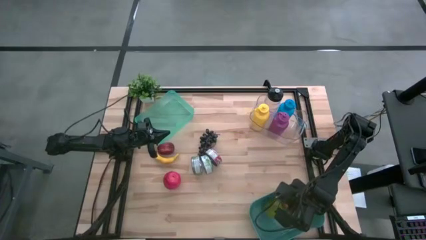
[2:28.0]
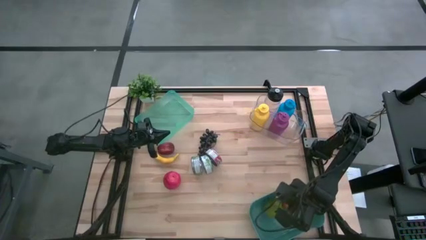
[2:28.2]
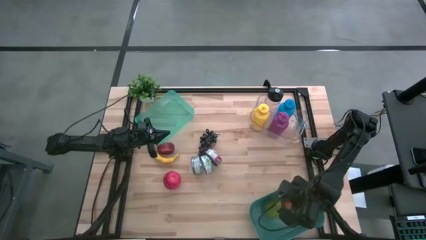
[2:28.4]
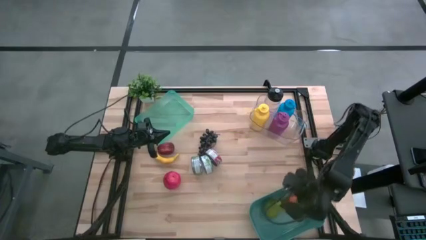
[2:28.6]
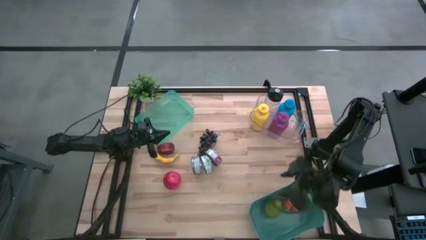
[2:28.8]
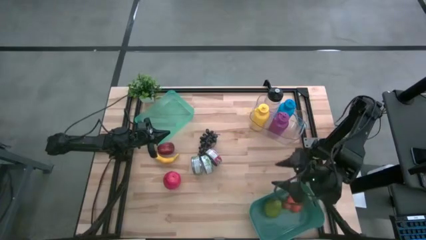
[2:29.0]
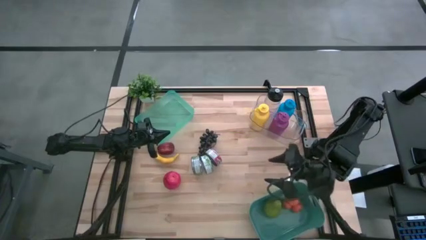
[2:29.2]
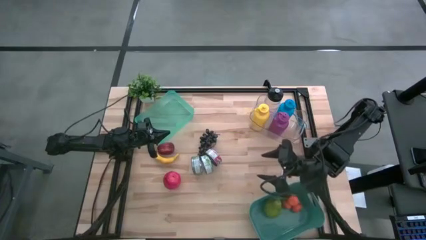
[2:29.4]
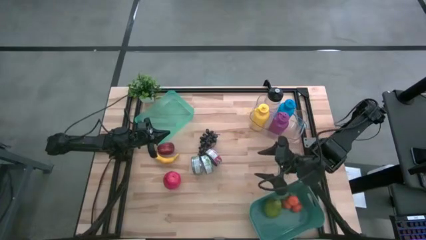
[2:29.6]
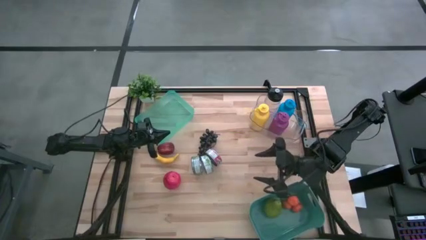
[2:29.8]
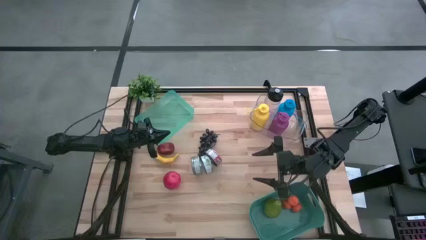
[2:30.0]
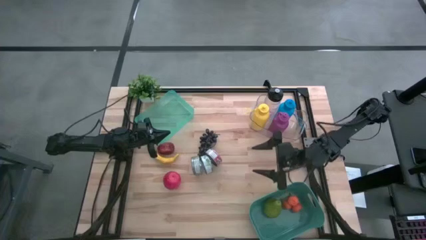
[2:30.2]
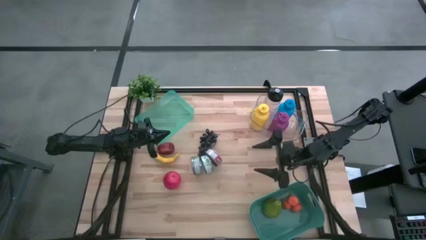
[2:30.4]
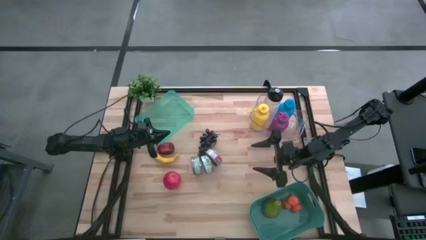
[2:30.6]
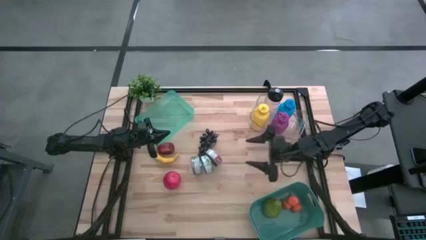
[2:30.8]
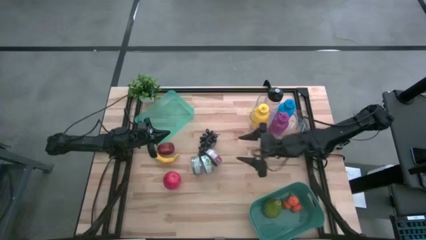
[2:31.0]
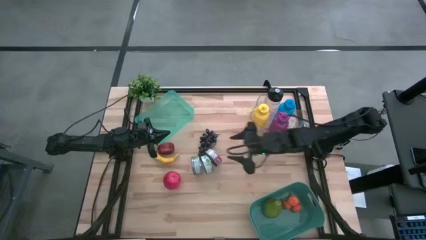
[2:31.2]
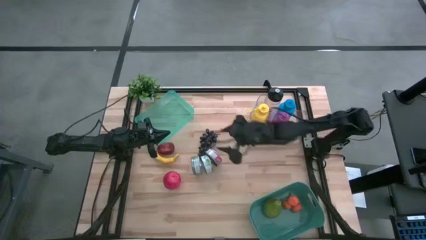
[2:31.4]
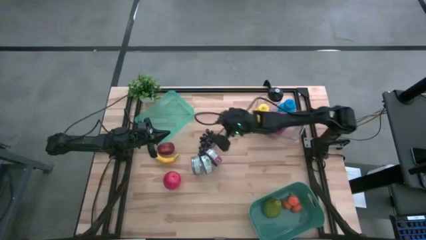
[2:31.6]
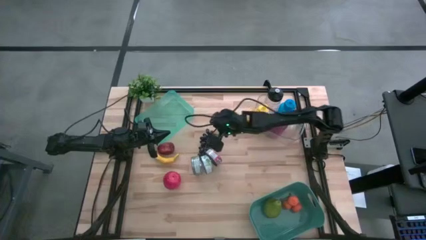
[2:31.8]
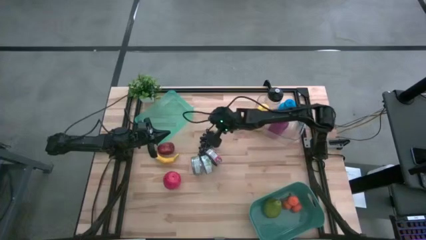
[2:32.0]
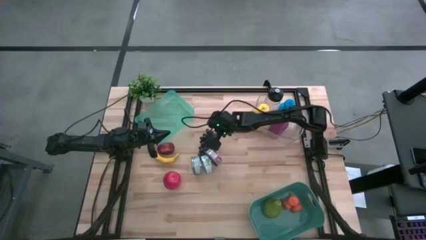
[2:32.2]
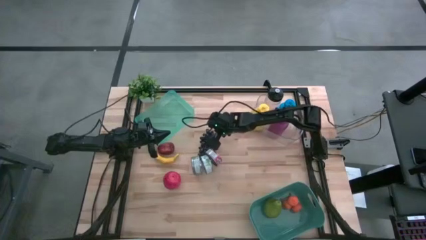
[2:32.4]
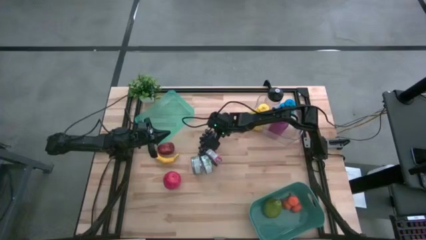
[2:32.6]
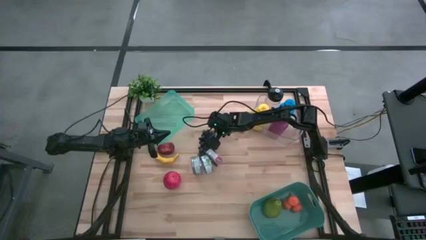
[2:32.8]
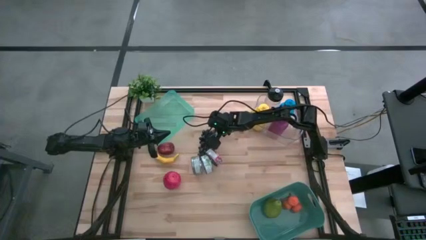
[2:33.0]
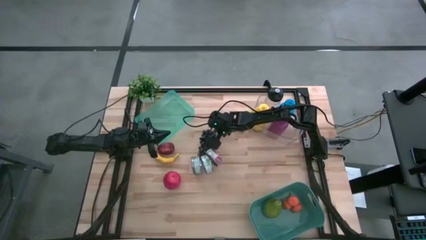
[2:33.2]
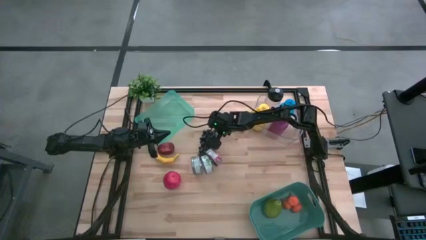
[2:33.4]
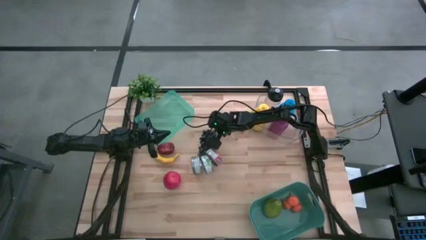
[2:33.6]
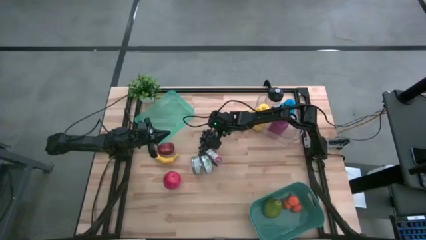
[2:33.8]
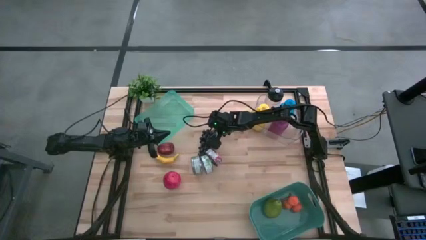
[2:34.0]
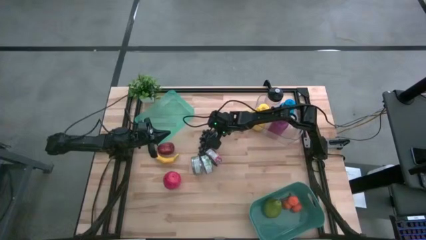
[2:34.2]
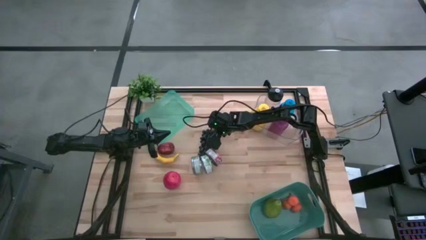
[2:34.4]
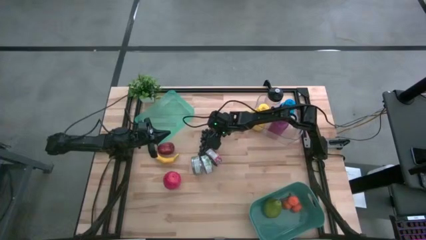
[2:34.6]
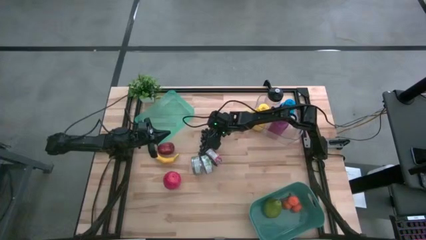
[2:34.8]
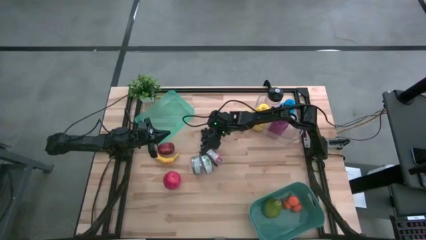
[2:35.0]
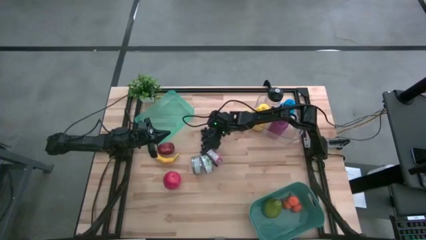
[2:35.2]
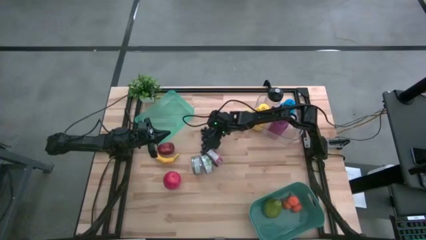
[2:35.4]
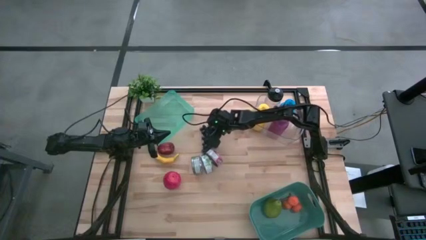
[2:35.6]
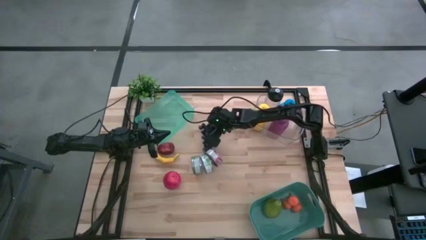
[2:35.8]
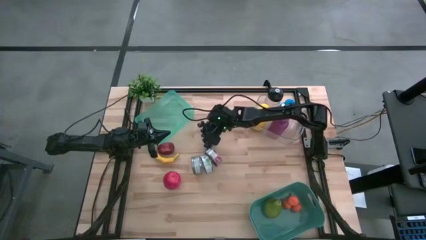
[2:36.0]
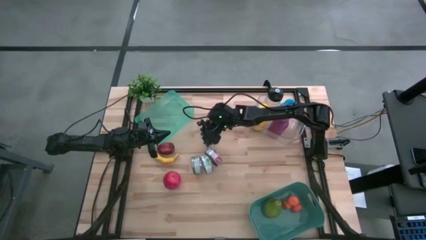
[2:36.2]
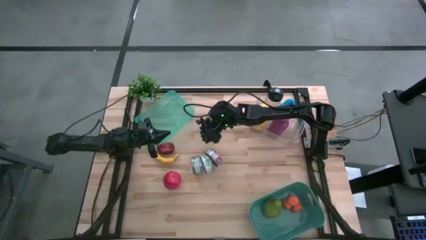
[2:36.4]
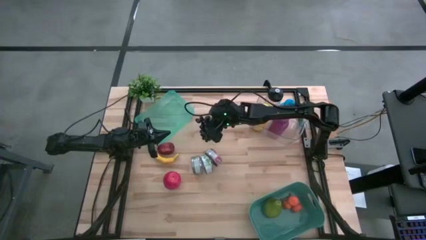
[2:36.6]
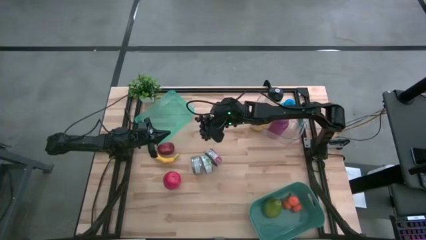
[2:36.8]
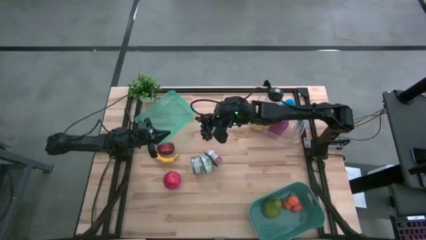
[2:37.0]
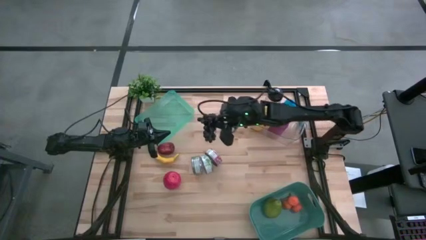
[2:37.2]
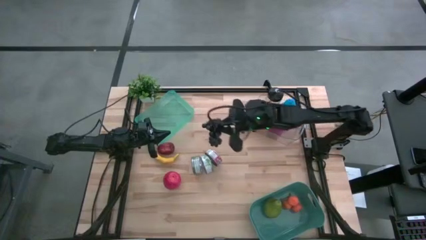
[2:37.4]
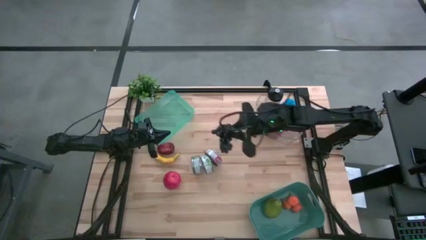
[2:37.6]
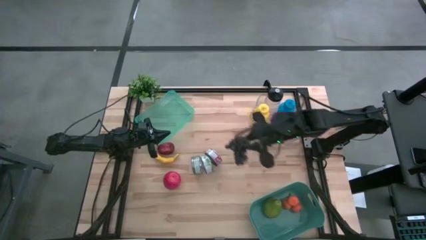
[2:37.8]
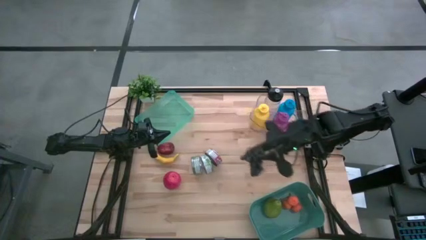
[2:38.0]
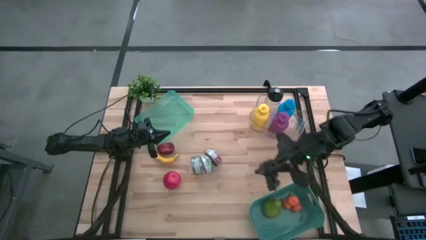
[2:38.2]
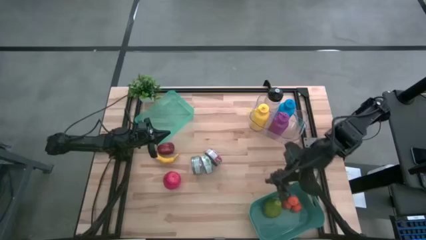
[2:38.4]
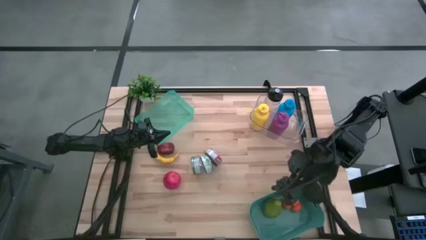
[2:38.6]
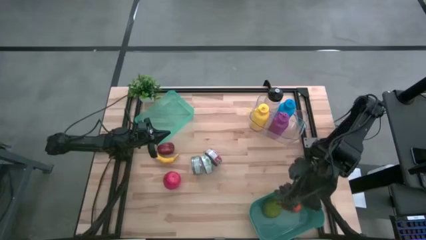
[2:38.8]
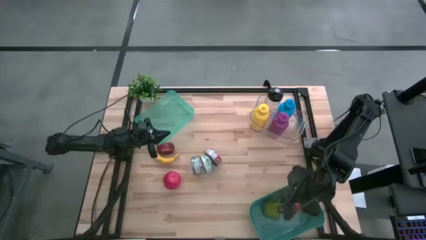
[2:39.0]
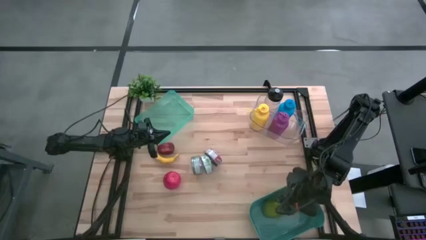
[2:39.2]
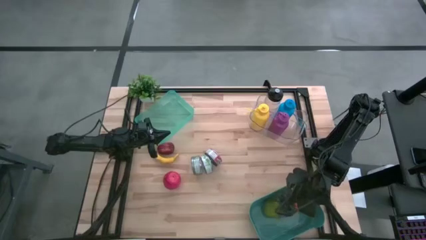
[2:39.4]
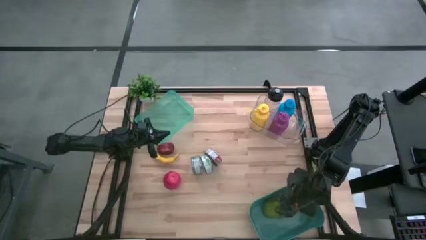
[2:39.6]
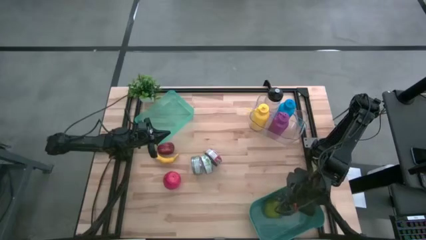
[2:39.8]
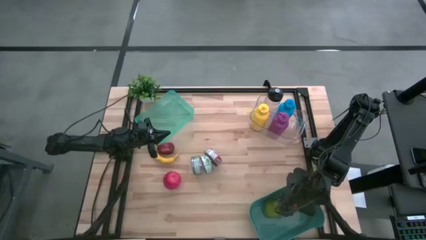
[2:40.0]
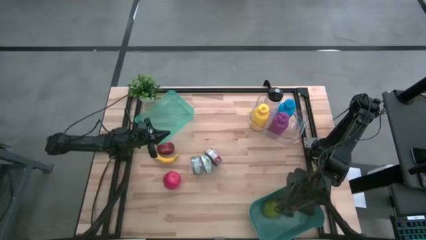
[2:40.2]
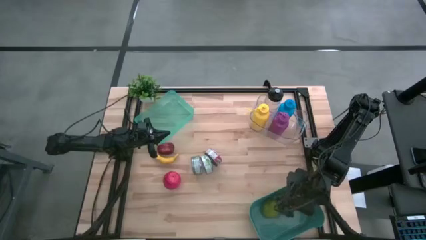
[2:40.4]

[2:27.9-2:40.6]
Task: Pick & Place Food Item
Put the black grapes into the dark green bin

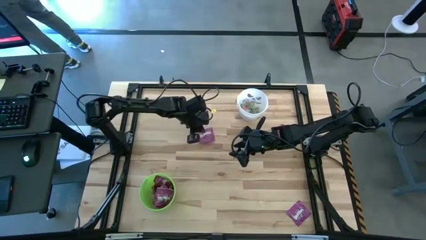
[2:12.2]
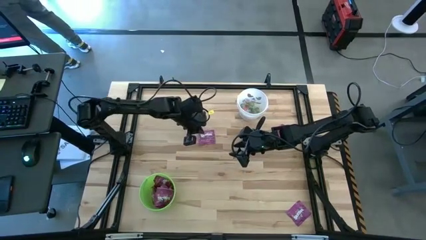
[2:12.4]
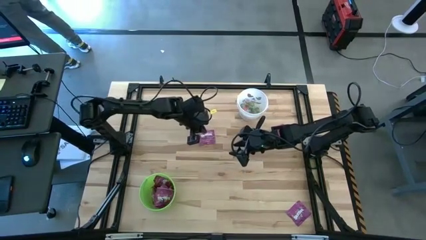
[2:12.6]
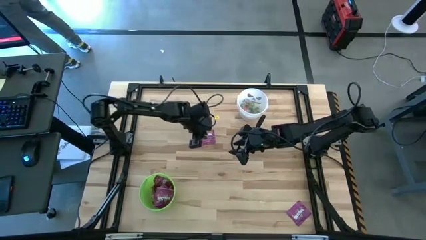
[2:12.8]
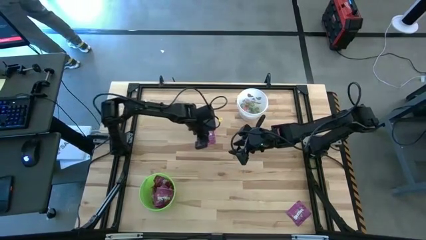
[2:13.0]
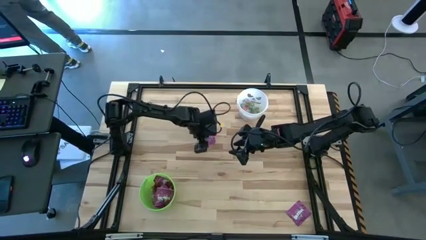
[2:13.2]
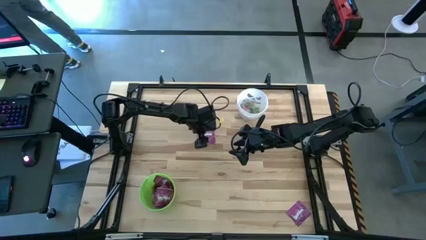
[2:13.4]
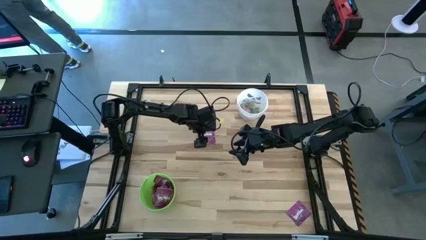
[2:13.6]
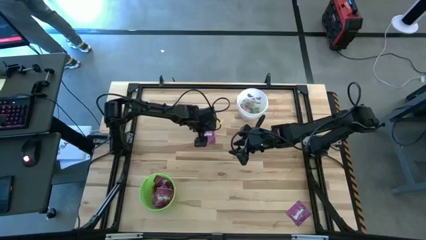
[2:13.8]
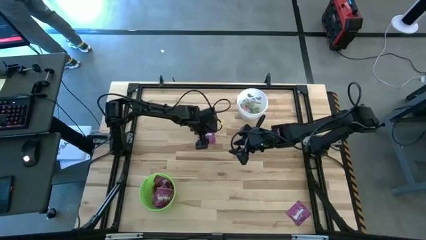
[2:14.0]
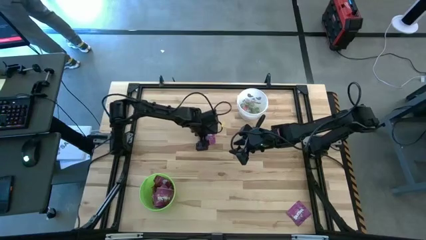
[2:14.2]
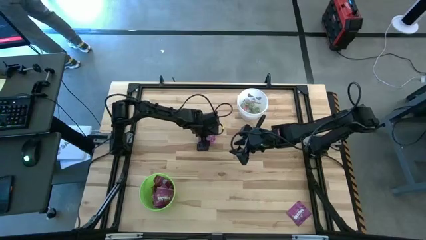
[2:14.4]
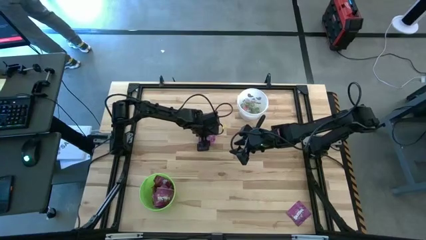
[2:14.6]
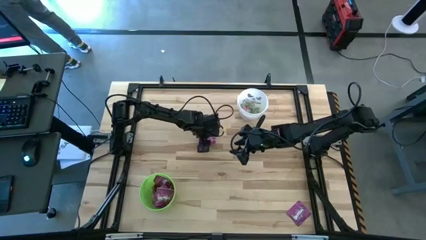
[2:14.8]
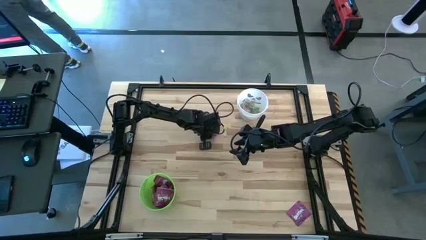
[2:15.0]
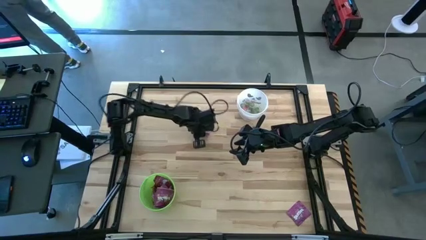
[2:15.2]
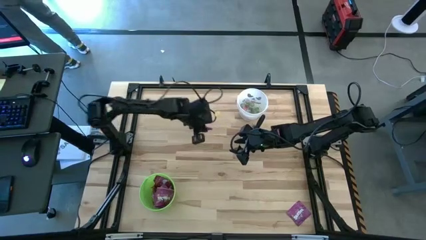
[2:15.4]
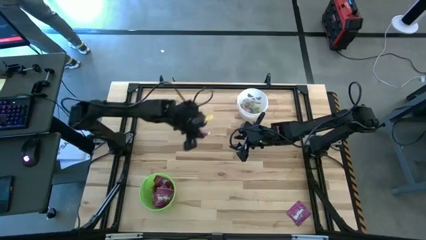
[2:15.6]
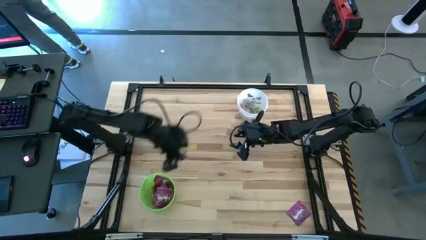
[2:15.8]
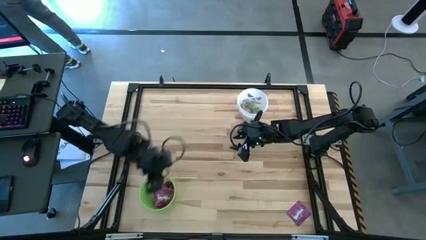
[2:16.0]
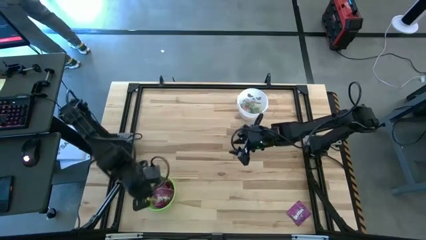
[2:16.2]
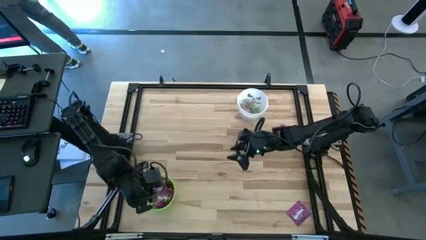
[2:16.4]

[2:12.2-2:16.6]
Task: Sort candy by brand, put in halloween buckets
Put the purple candy into the green bucket
